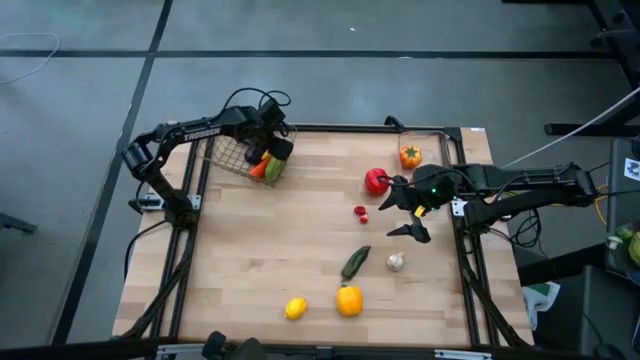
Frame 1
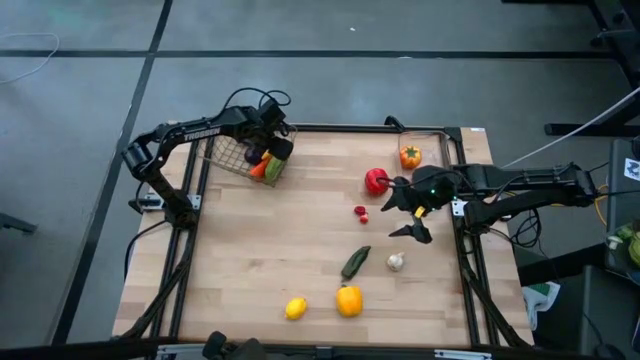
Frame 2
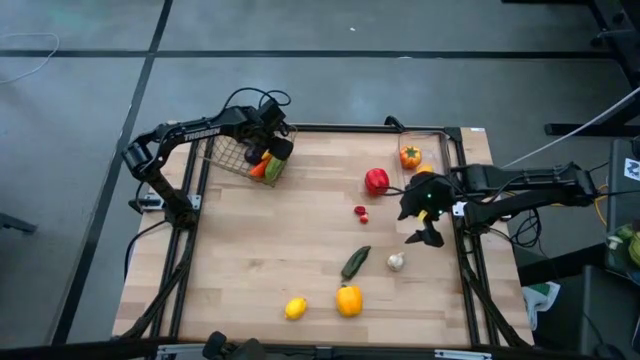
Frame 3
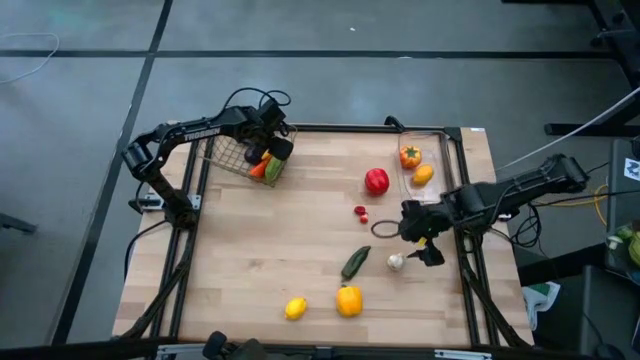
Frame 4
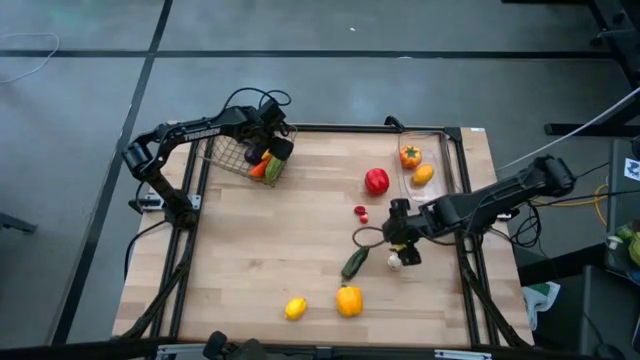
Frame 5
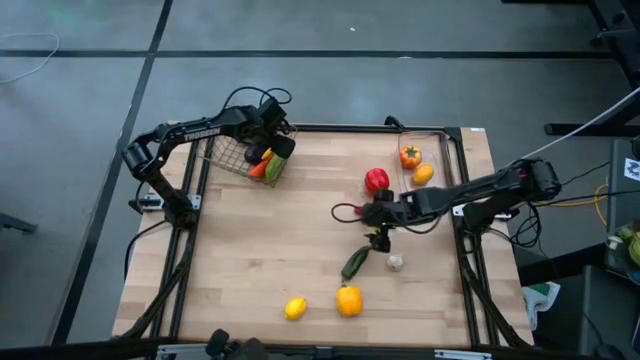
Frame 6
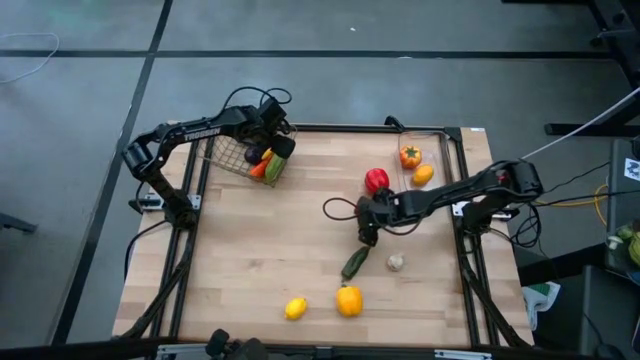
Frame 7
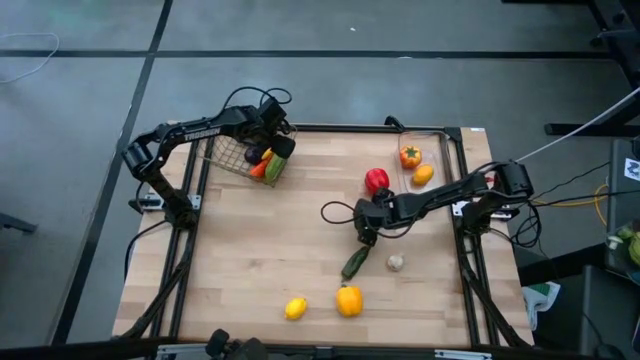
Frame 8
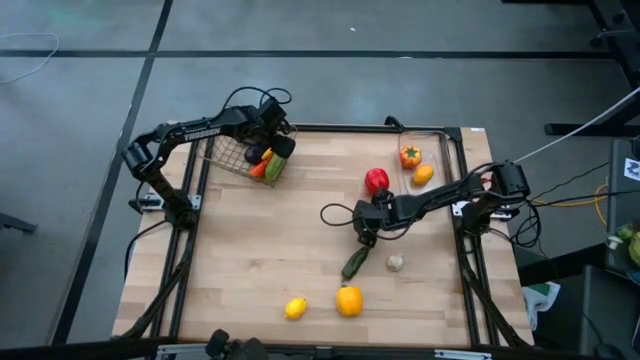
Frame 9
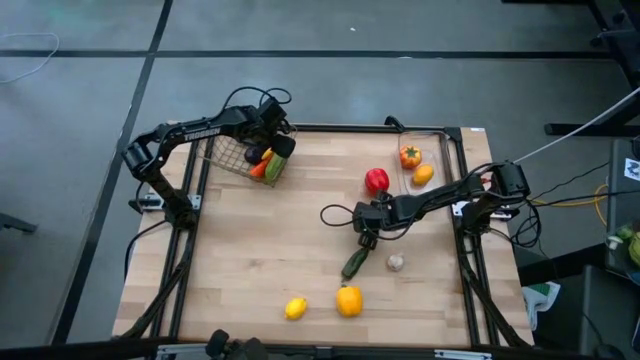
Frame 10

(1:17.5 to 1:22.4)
Task: Sort produce into baskets
Put the red mushroom into the silver wire basket

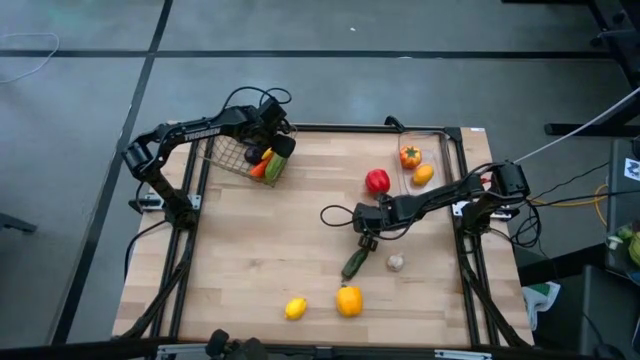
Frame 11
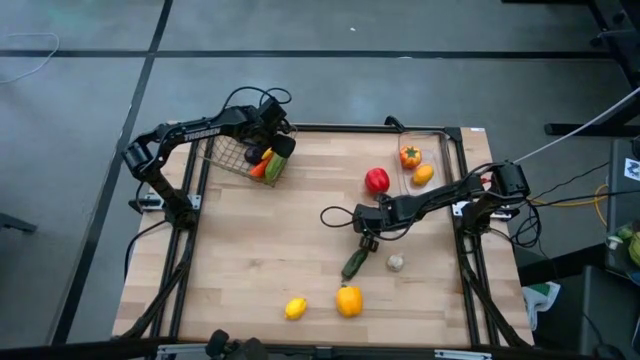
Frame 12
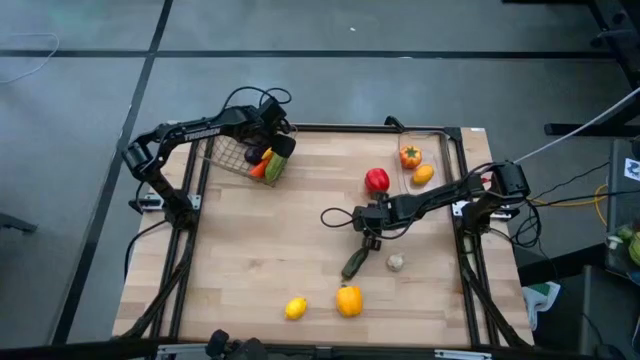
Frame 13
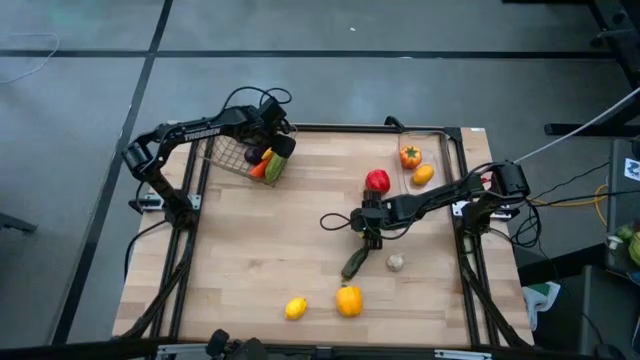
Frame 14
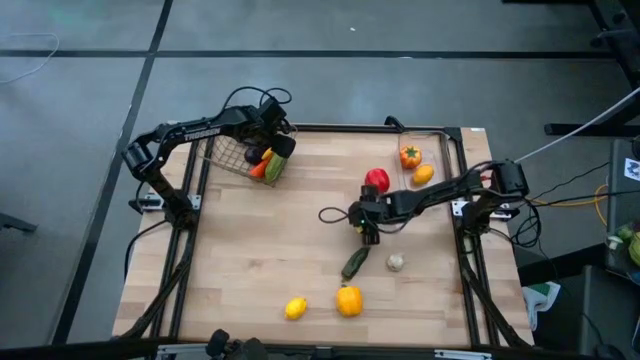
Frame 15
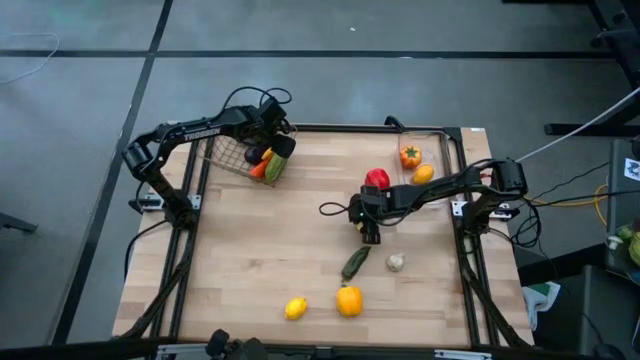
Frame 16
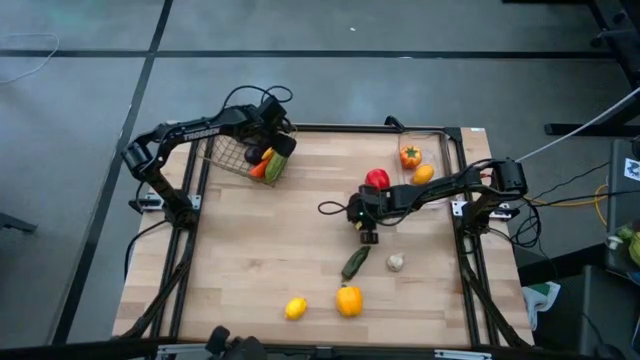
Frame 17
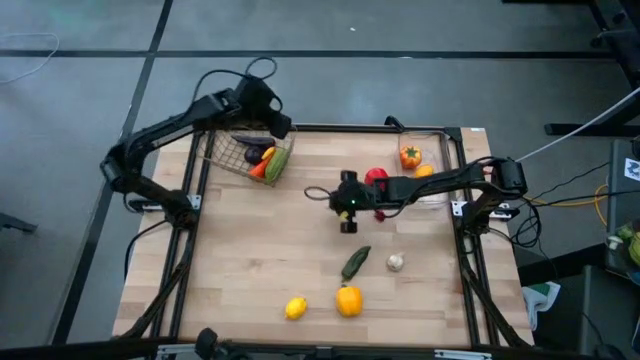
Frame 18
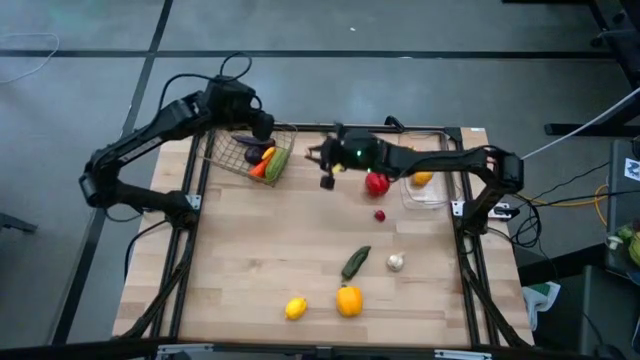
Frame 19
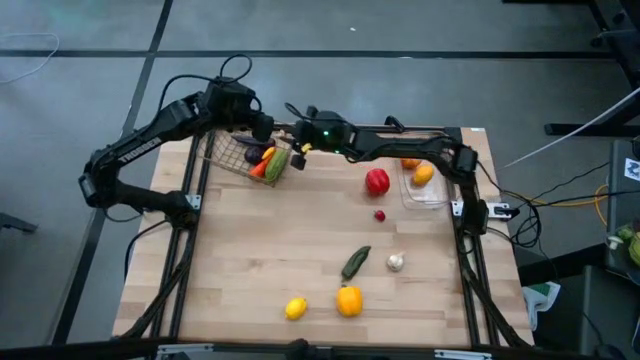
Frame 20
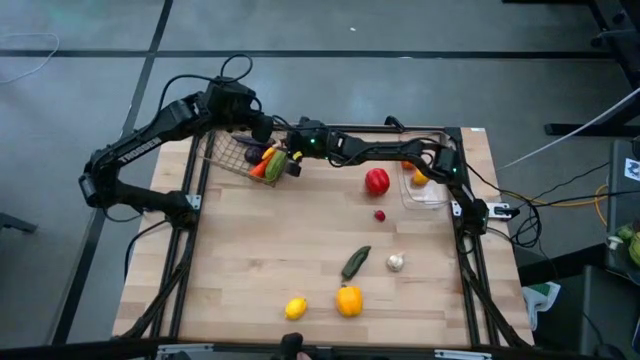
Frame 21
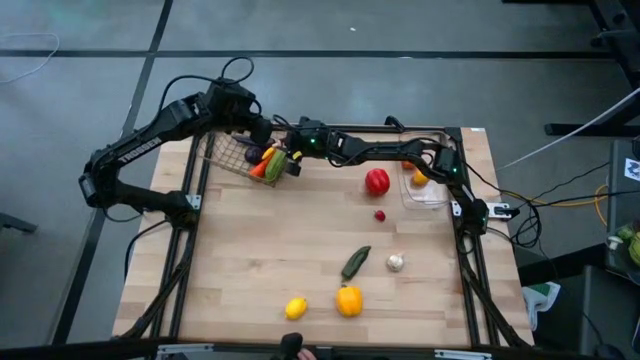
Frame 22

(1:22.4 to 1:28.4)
Put the red mushroom into the silver wire basket

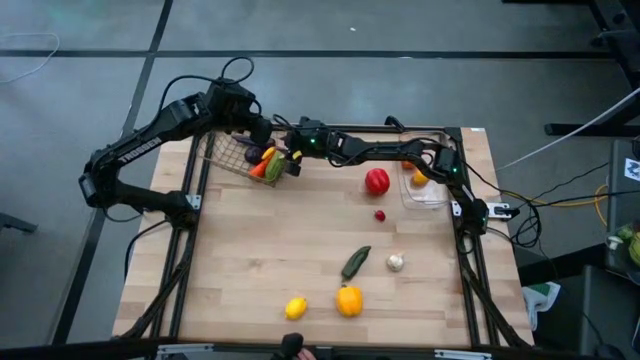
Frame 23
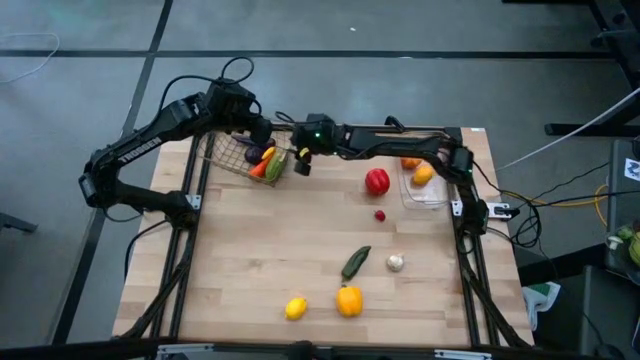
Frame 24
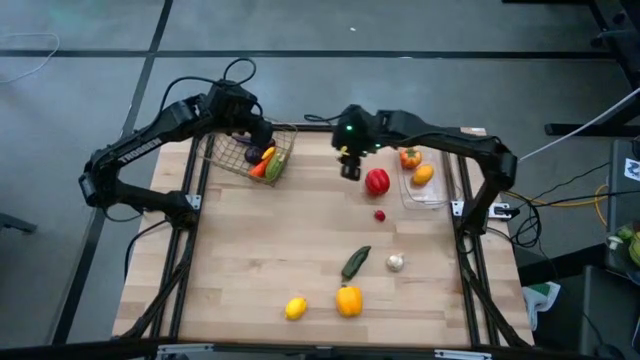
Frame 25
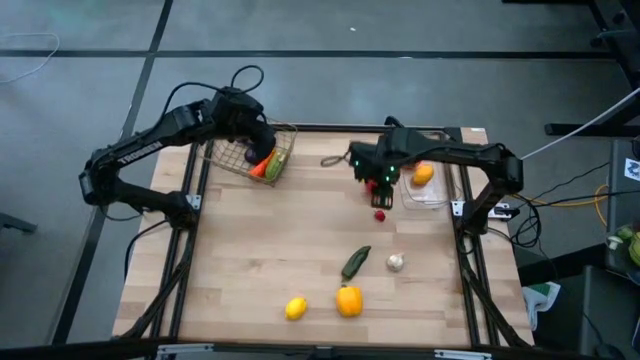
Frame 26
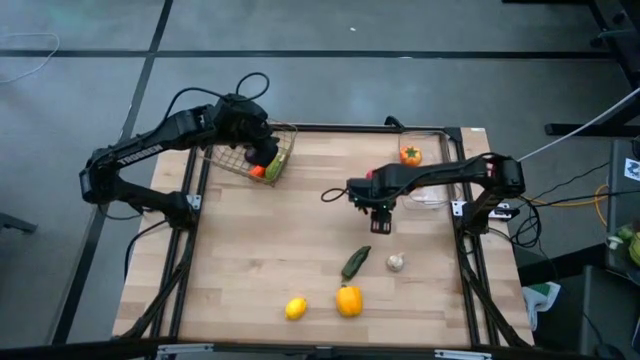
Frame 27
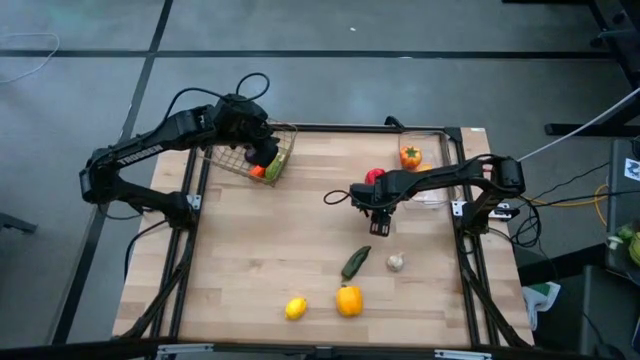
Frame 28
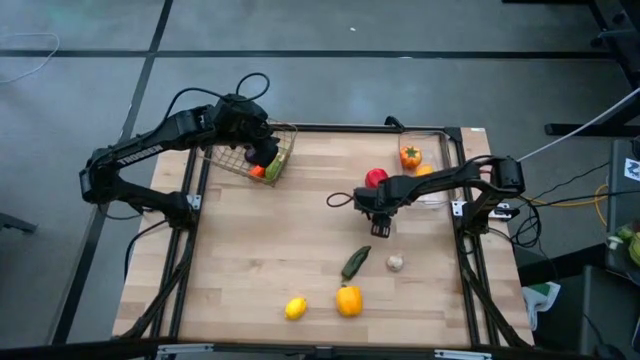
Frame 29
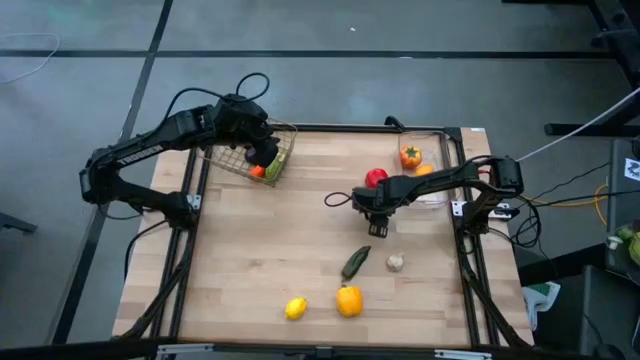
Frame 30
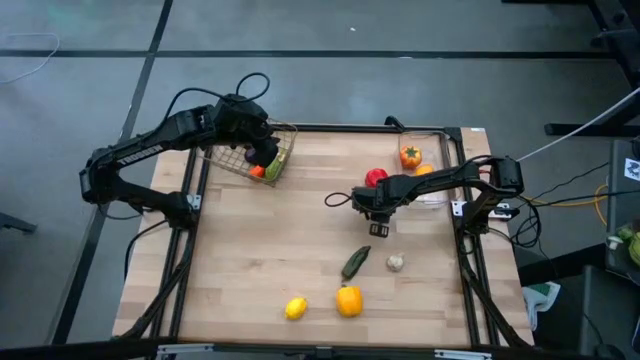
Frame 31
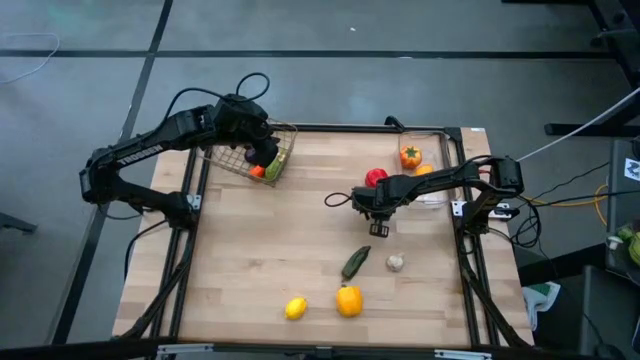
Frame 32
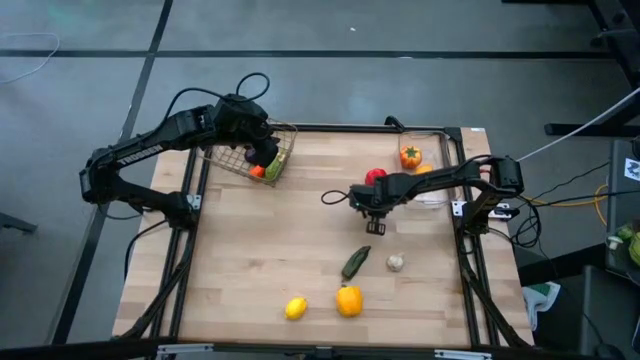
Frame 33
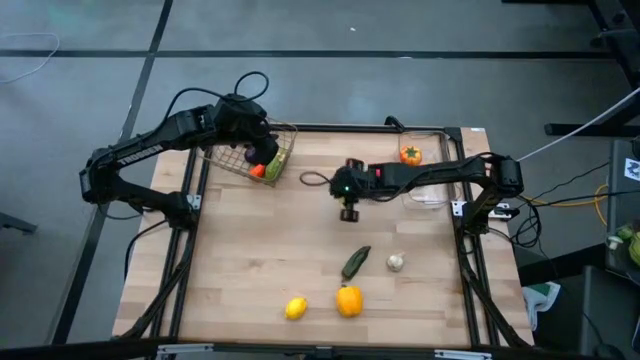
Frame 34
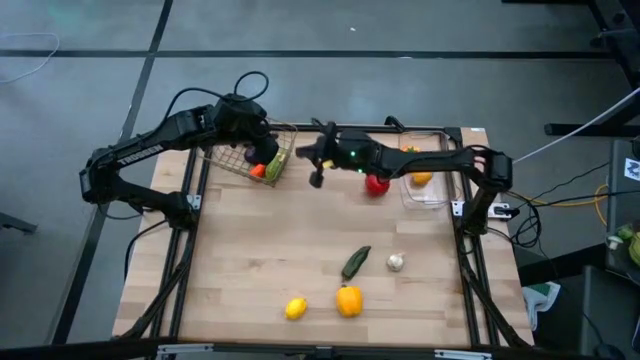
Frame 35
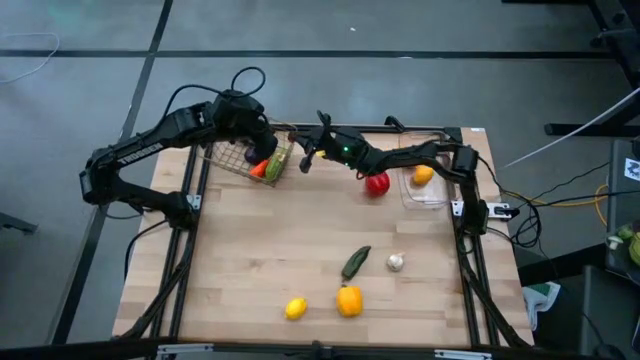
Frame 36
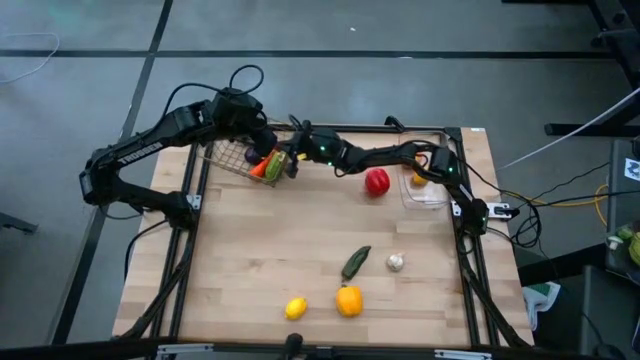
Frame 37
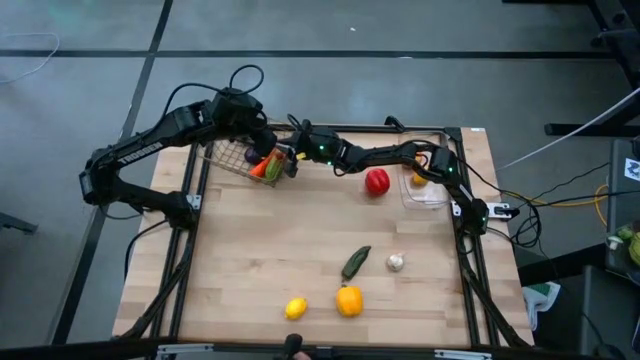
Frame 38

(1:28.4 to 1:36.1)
Put the red bell pepper into the silver wire basket

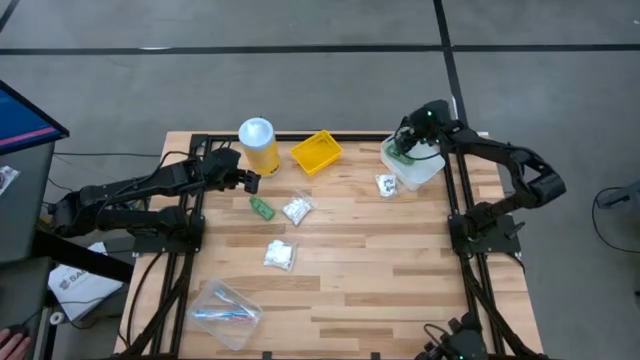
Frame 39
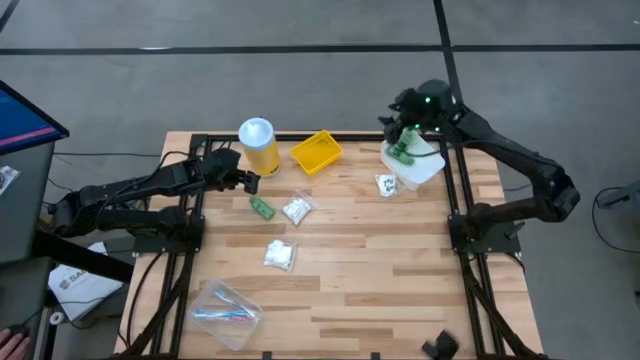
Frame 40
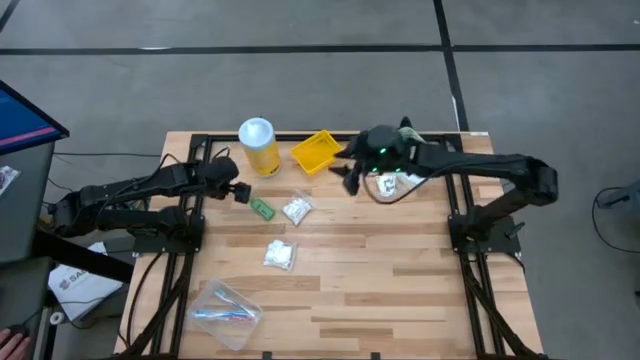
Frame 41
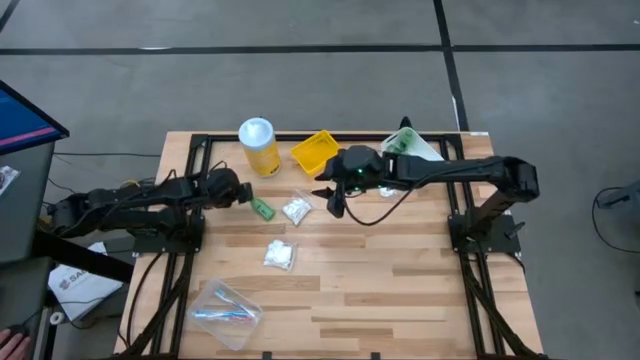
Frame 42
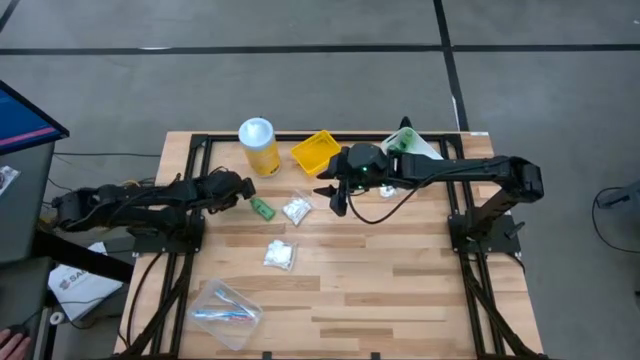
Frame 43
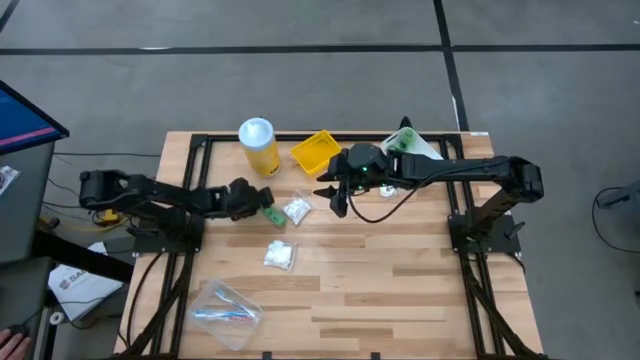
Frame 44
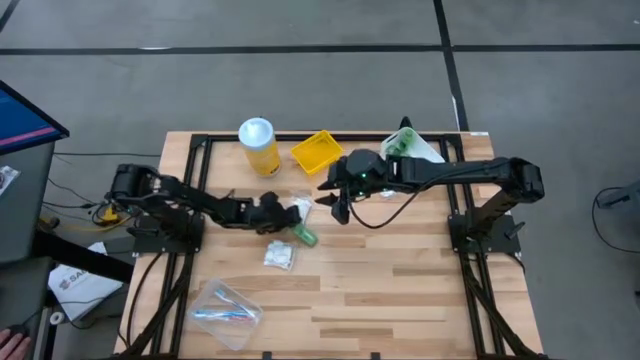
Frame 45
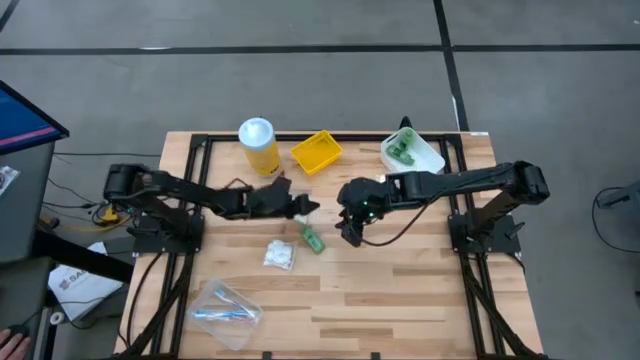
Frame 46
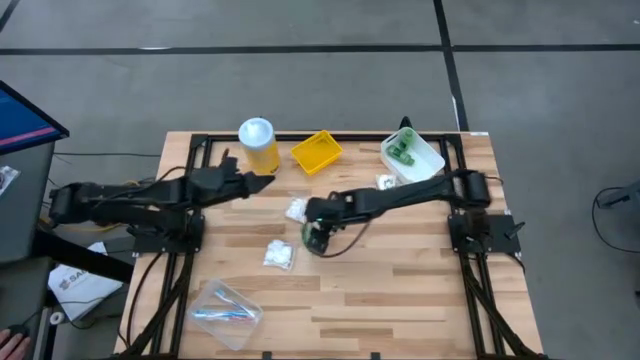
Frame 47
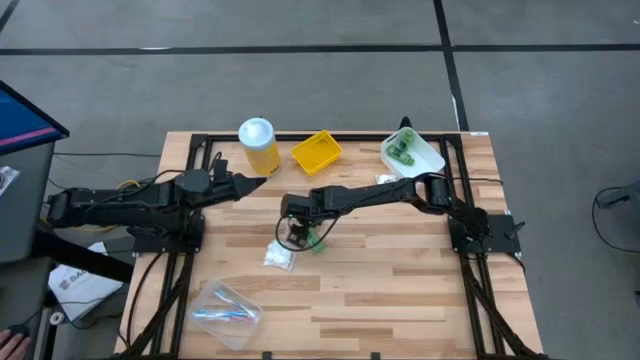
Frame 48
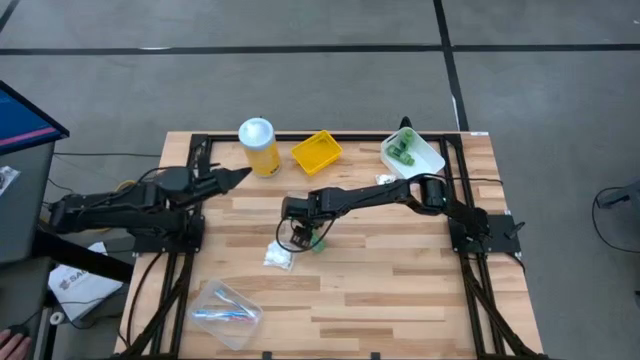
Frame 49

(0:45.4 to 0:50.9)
Task: Pick & Place Travel size toiletries
Put the green shampoo bottle into the white bin
